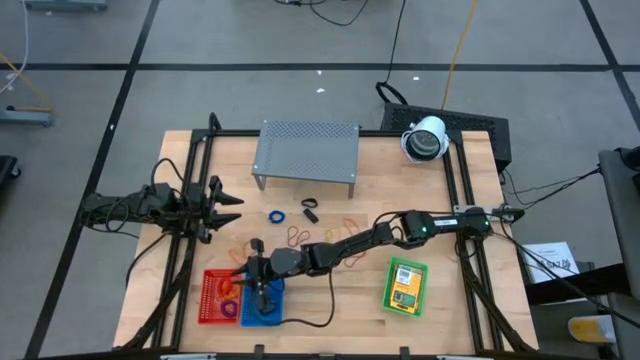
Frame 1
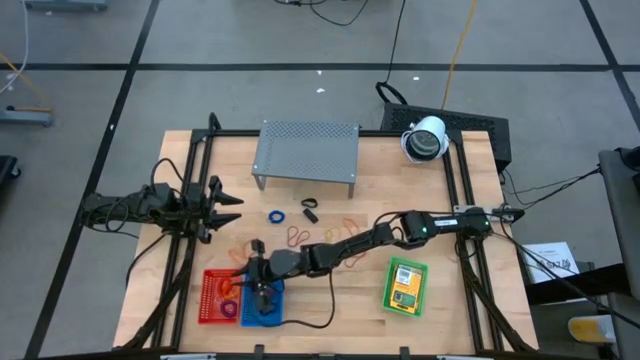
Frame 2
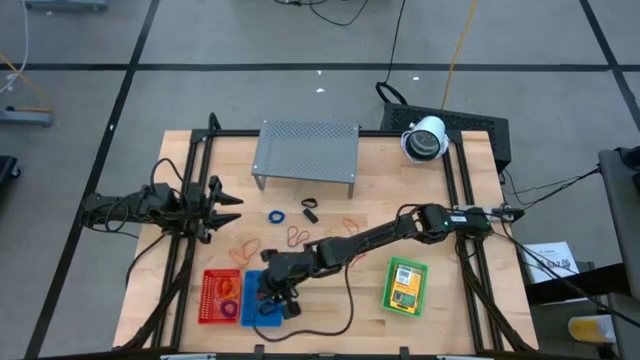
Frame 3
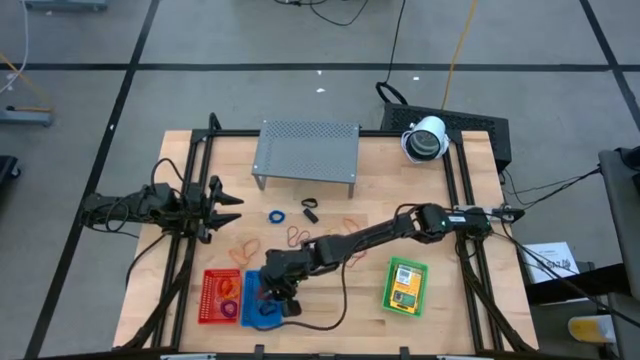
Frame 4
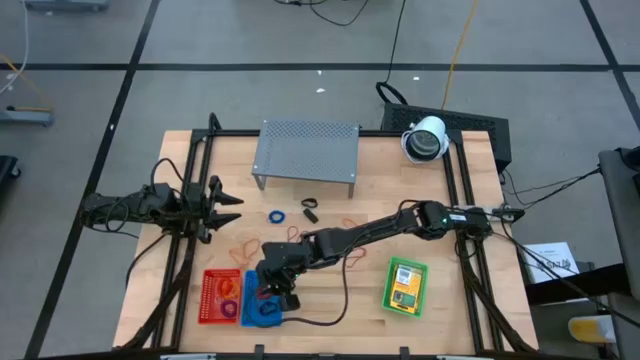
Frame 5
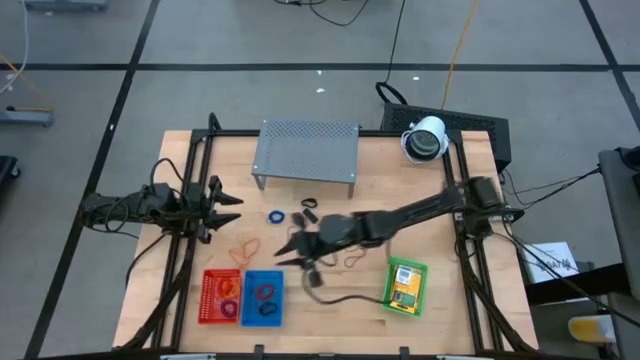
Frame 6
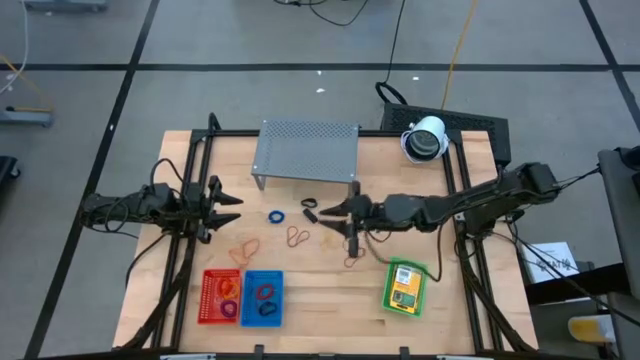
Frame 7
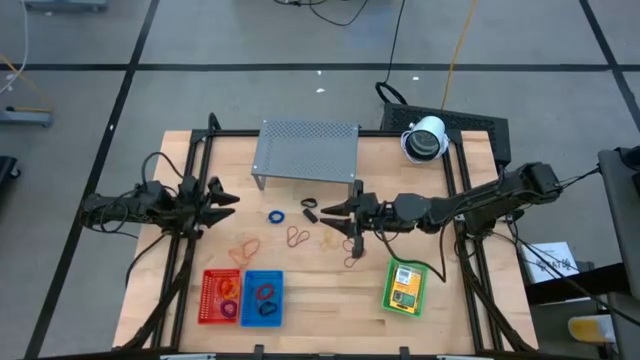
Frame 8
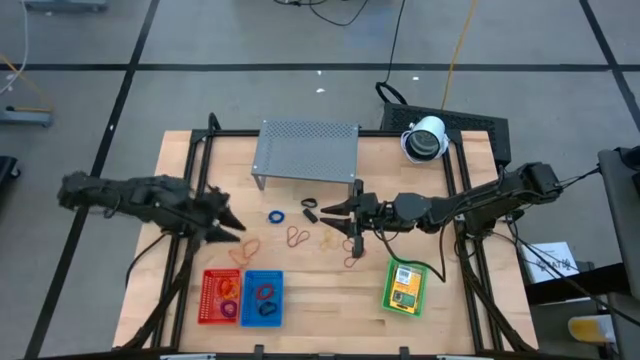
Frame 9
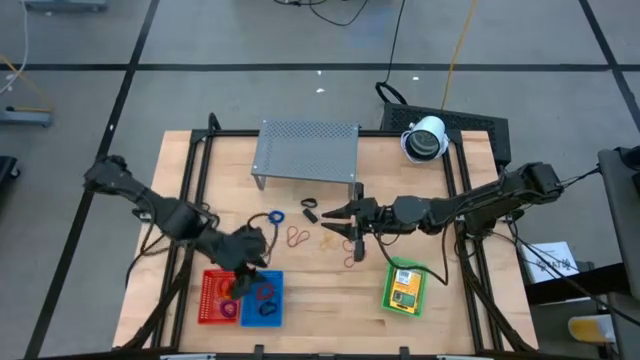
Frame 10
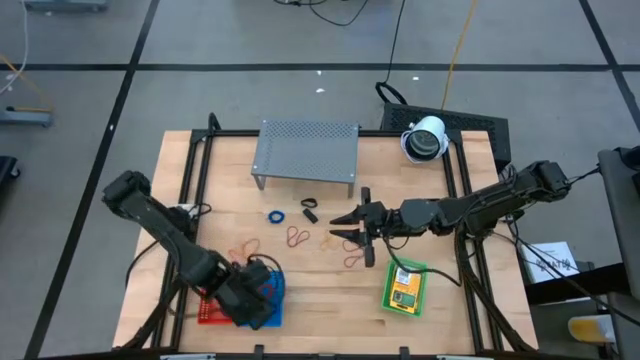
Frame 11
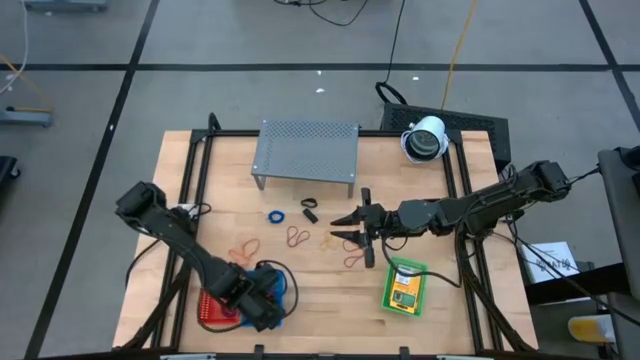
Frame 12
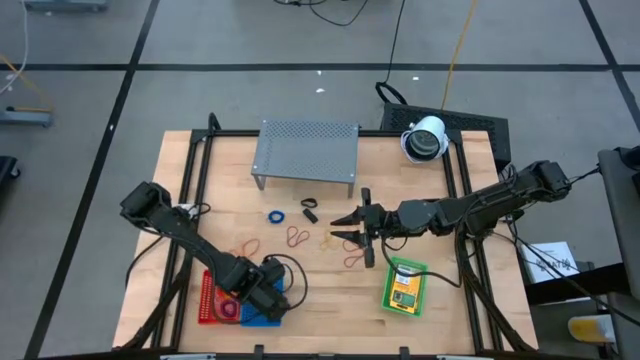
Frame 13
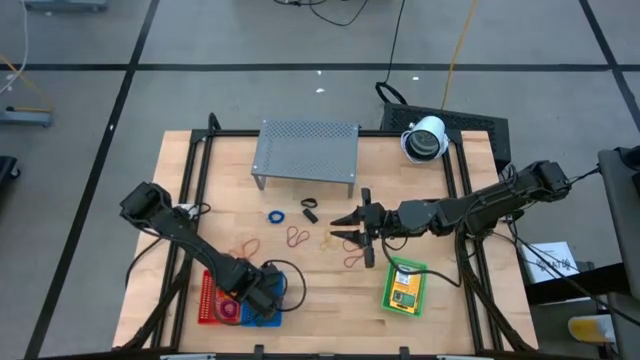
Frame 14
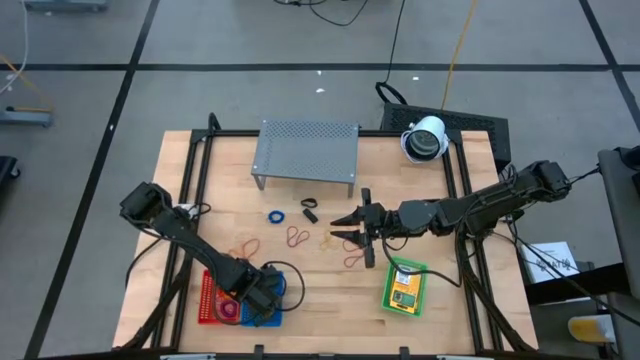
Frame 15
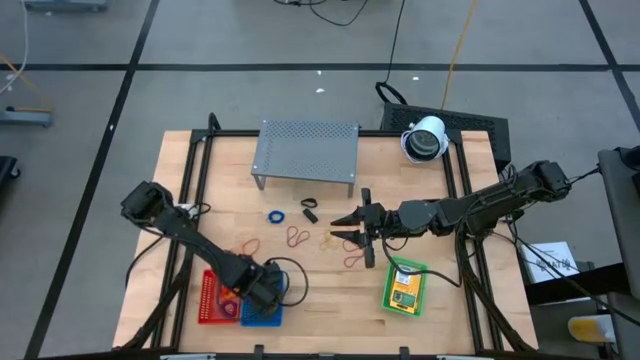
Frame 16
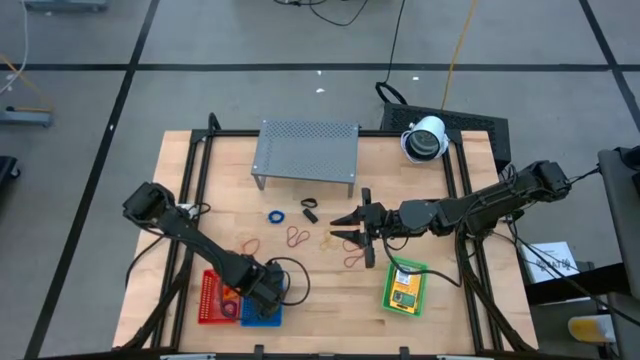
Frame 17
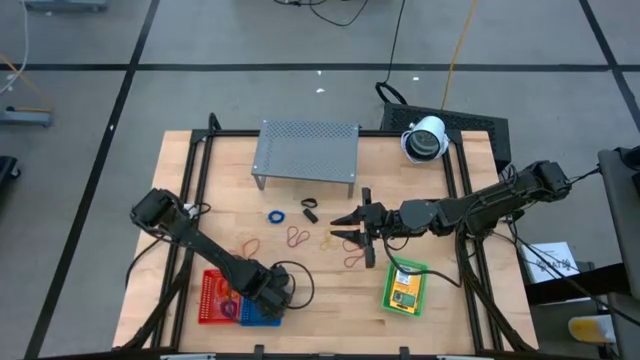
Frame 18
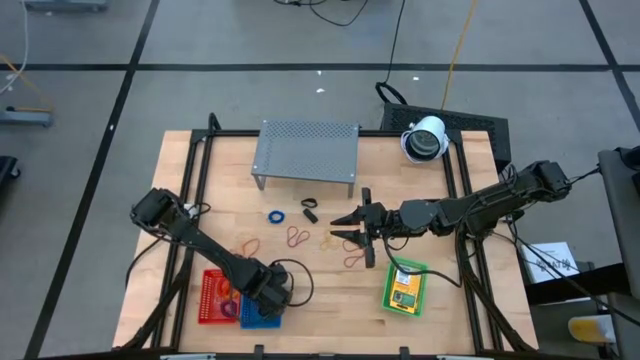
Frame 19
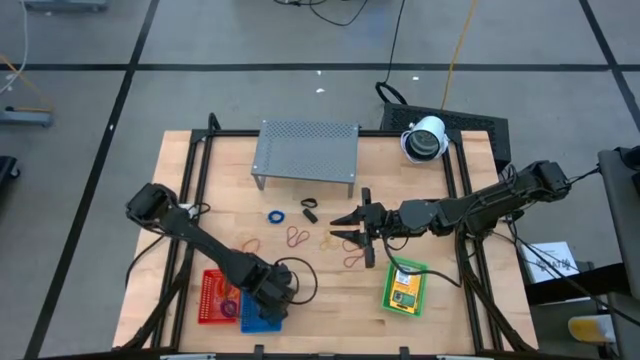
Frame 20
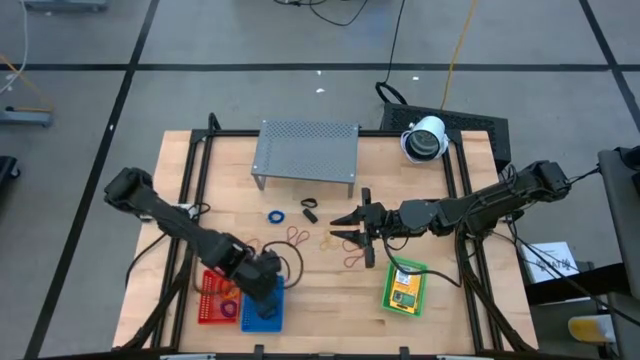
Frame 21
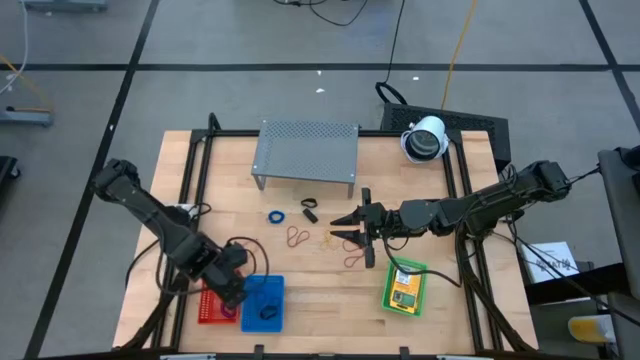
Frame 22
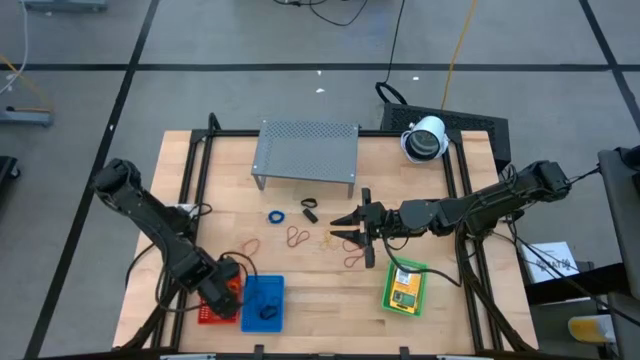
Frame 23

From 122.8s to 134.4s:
Task: Pick & Place Office Desk Supplies
Put the red spring keychain into the red bin

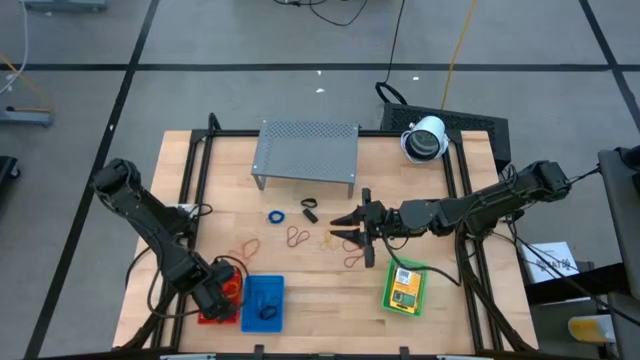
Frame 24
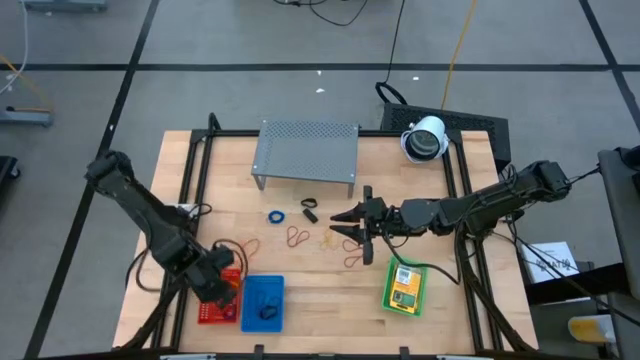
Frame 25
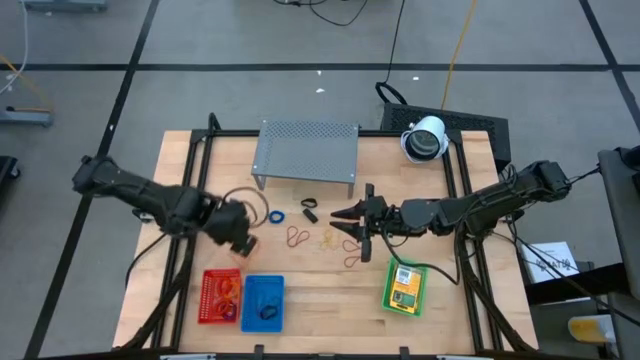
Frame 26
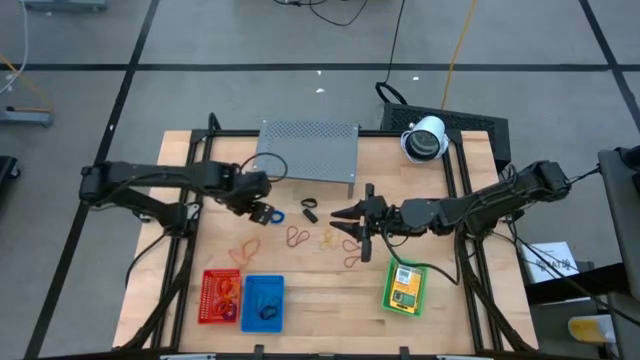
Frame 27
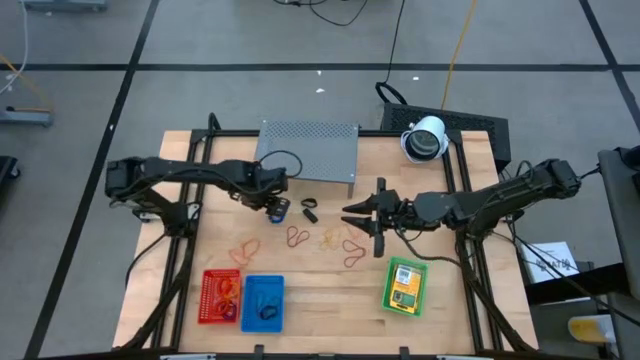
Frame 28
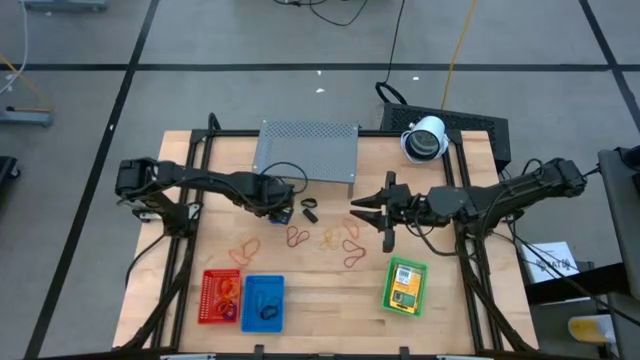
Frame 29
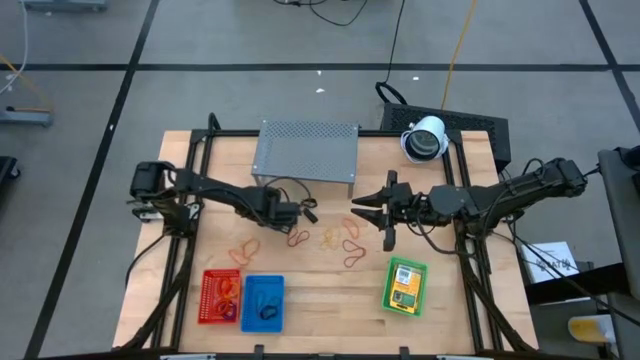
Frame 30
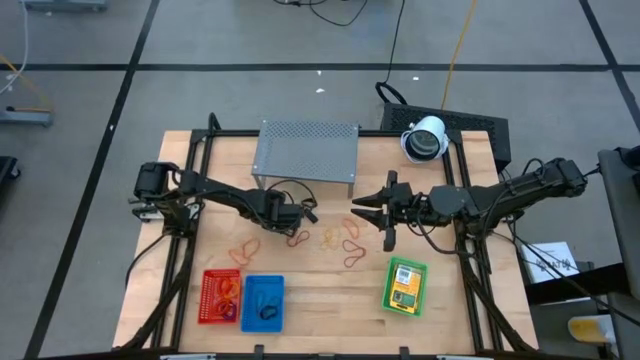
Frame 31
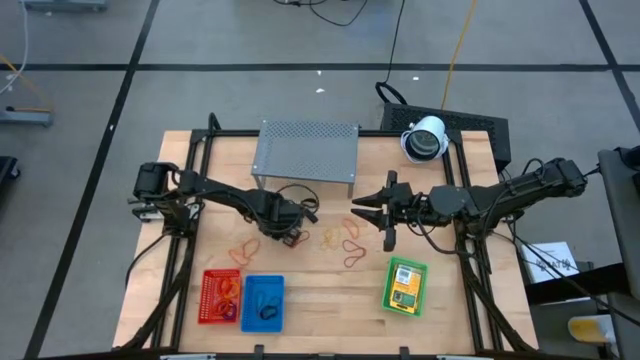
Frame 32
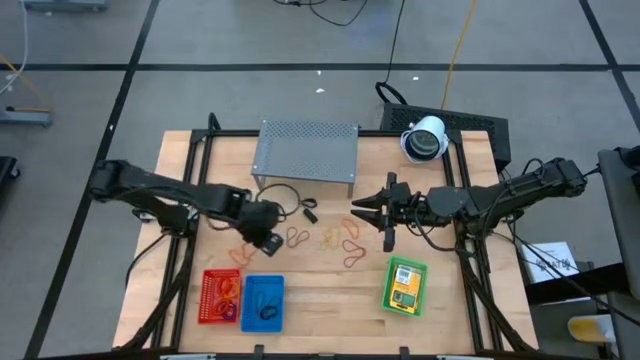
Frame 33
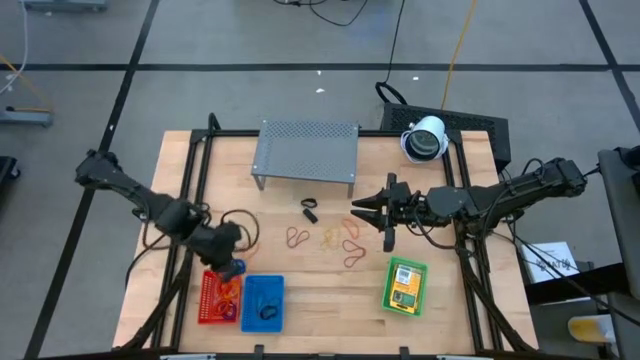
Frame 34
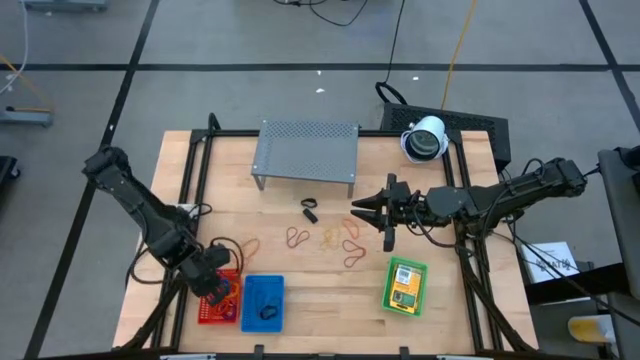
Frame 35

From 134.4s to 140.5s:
Put the blue spring keychain into the red bin

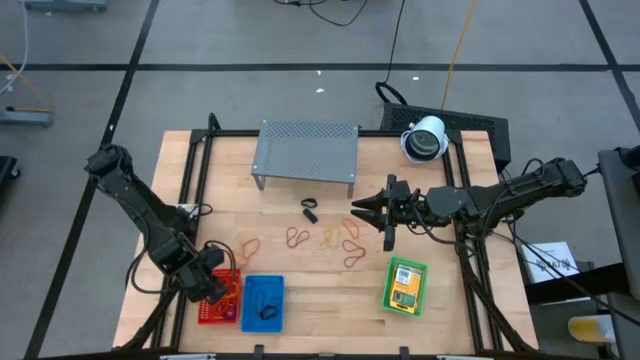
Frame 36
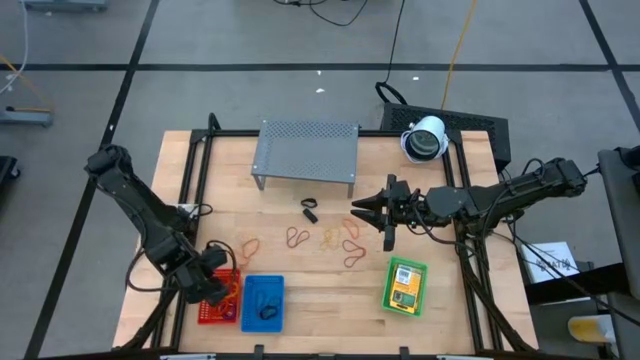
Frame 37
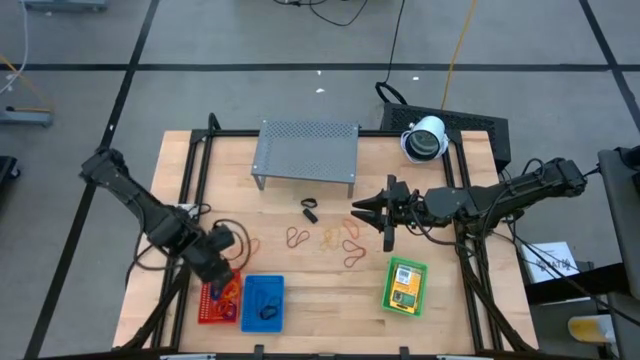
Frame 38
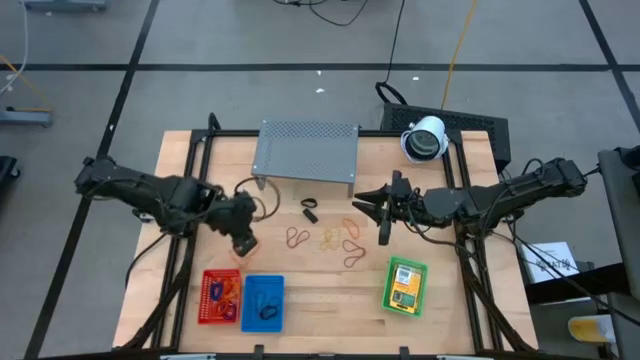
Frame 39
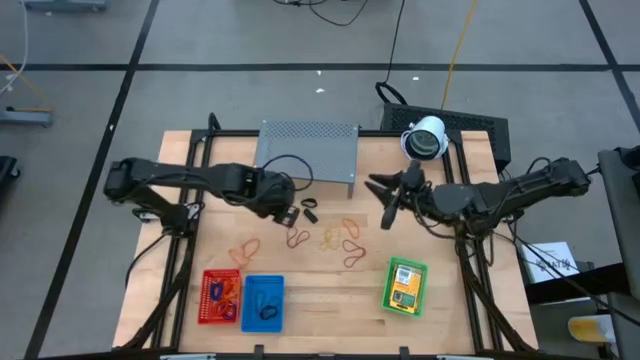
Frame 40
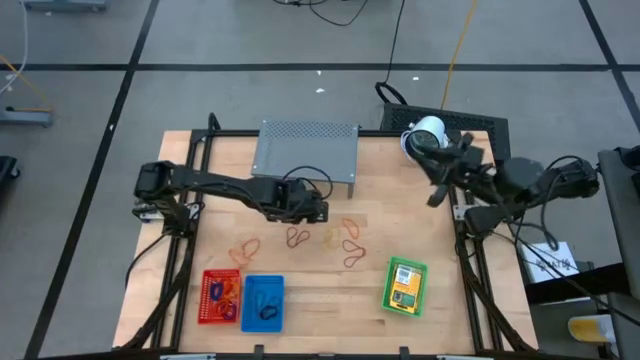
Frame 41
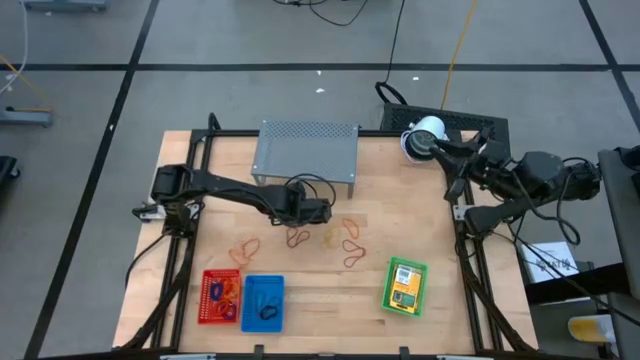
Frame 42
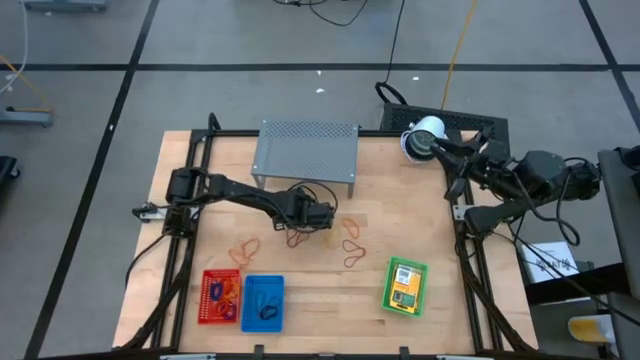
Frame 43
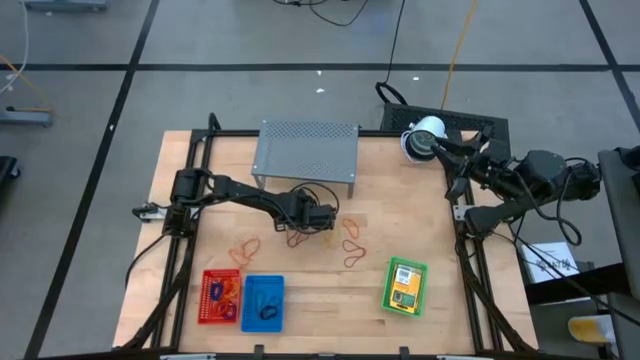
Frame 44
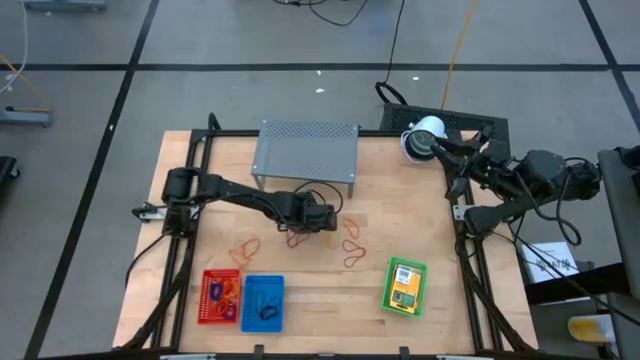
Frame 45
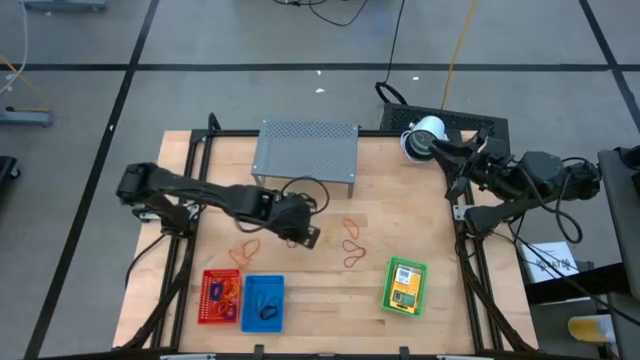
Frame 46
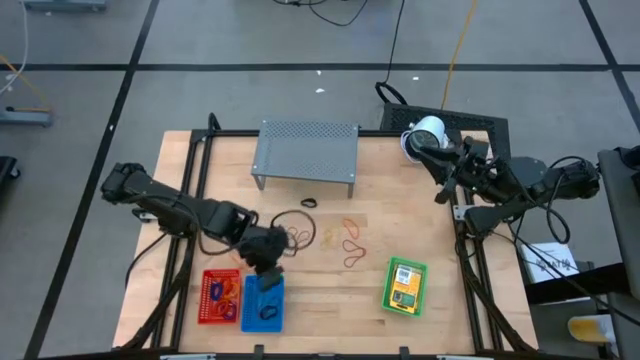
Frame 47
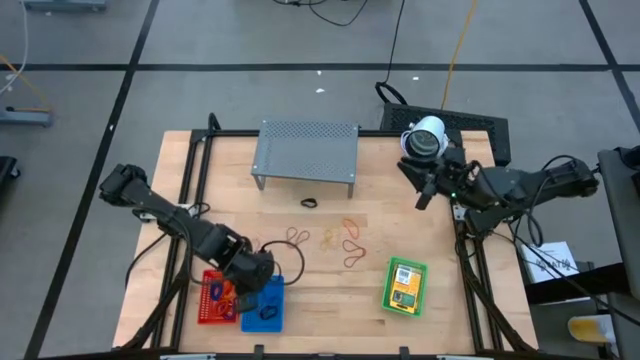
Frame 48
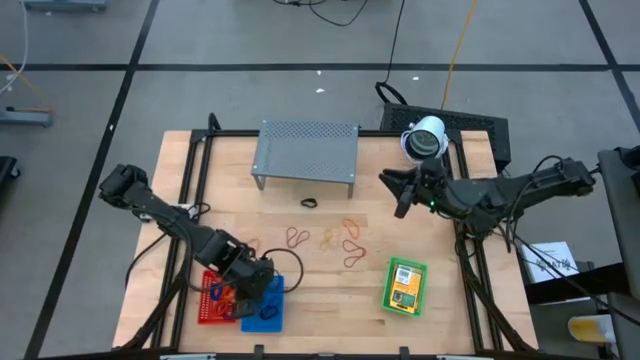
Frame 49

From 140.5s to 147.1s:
Put the black rubber band into the blue bin
